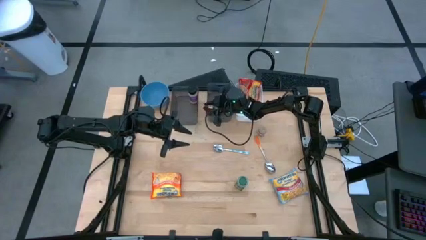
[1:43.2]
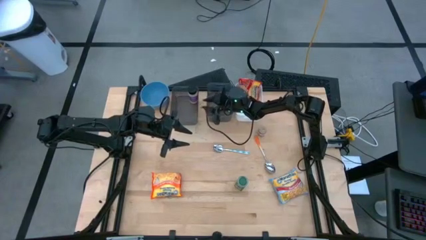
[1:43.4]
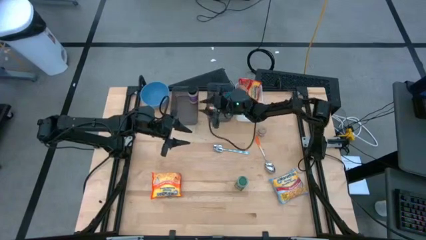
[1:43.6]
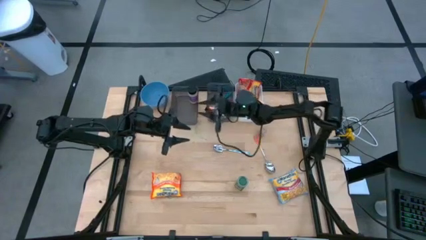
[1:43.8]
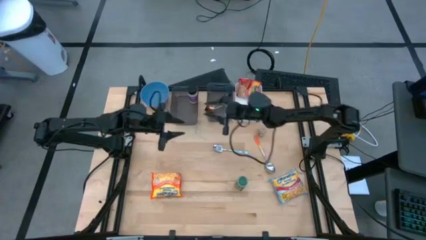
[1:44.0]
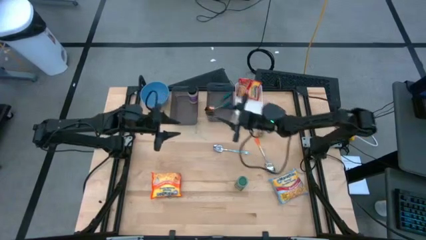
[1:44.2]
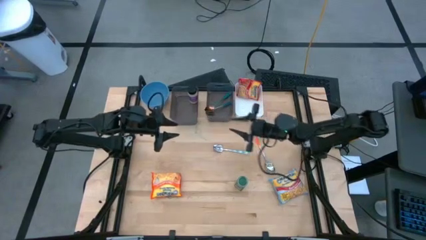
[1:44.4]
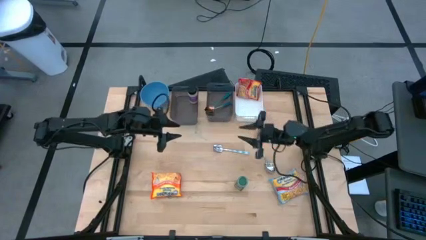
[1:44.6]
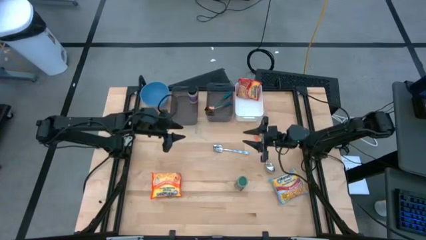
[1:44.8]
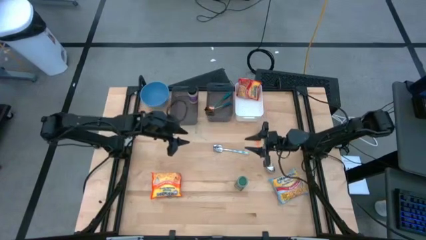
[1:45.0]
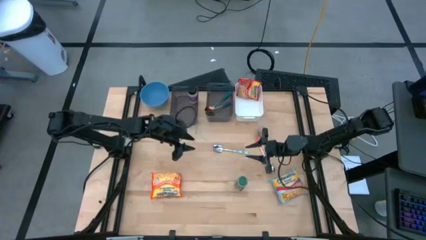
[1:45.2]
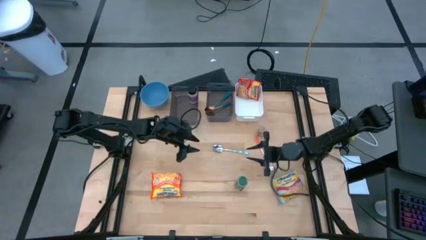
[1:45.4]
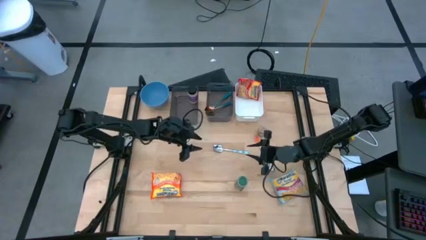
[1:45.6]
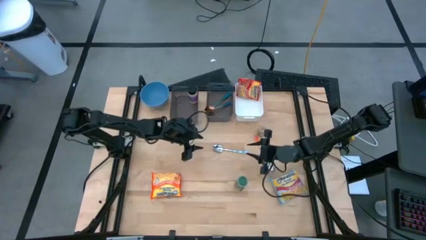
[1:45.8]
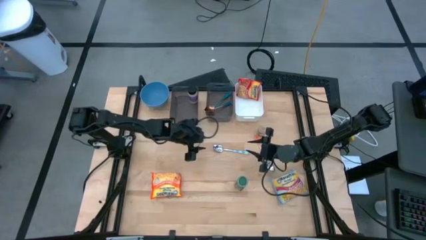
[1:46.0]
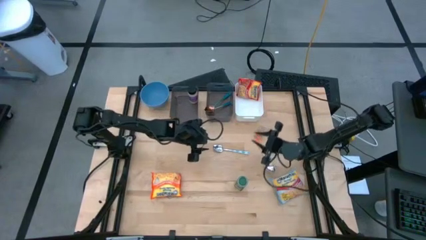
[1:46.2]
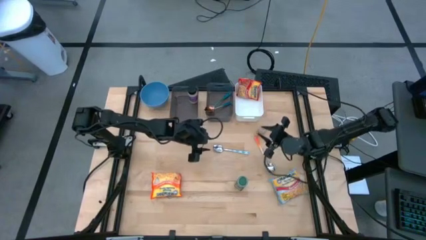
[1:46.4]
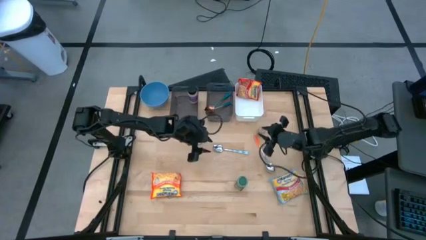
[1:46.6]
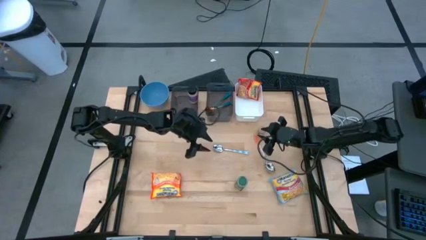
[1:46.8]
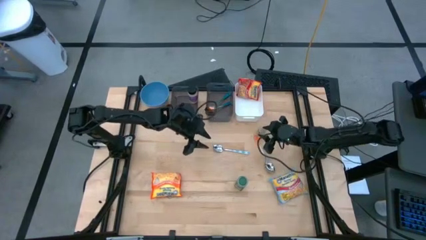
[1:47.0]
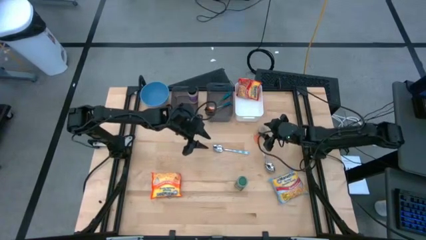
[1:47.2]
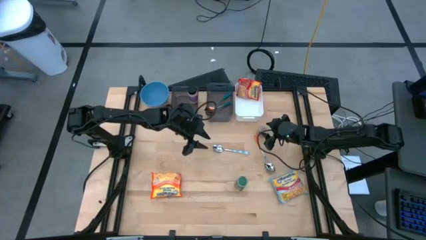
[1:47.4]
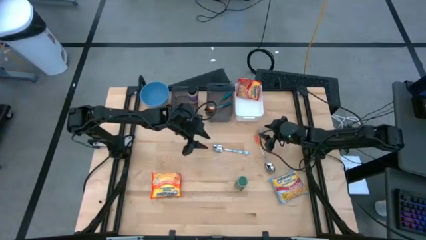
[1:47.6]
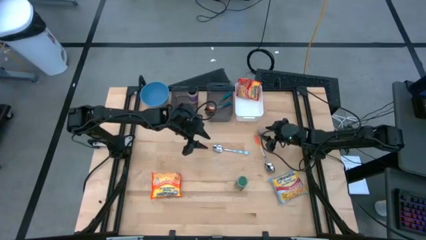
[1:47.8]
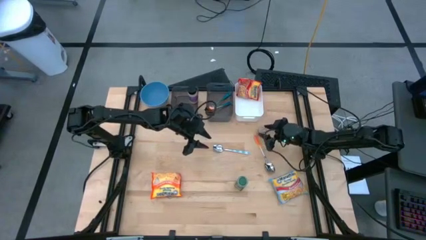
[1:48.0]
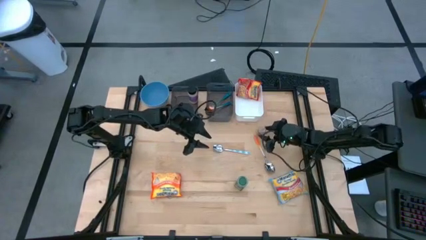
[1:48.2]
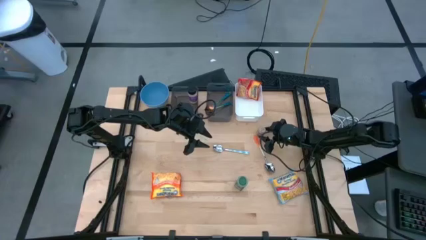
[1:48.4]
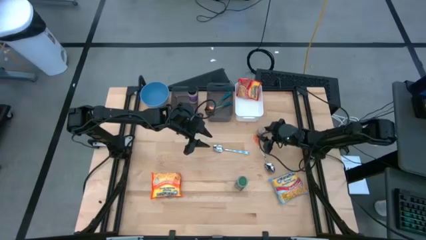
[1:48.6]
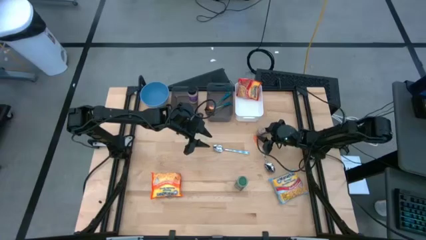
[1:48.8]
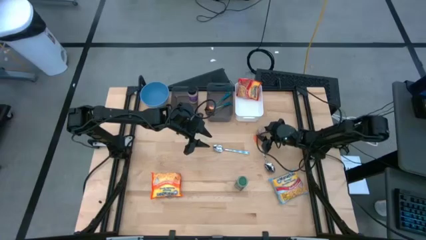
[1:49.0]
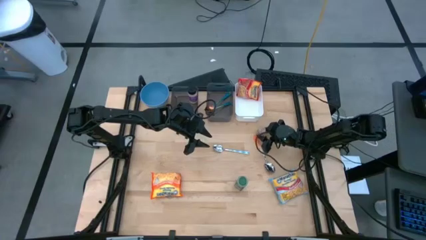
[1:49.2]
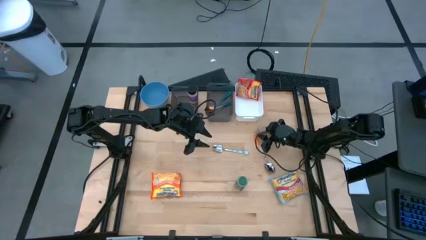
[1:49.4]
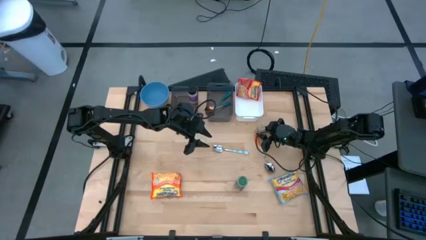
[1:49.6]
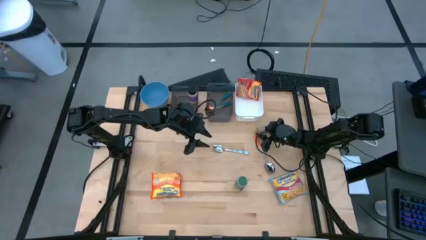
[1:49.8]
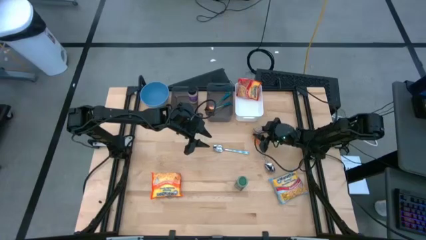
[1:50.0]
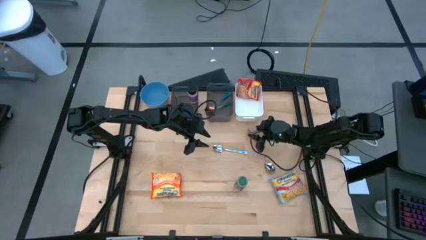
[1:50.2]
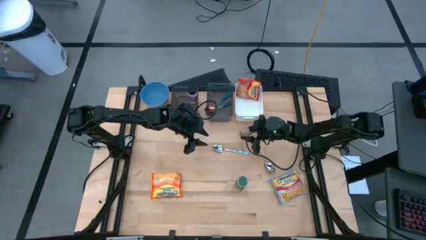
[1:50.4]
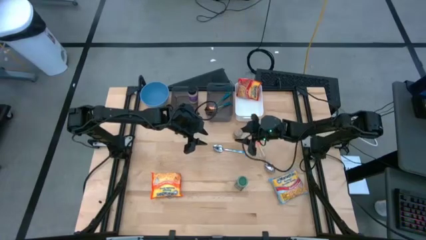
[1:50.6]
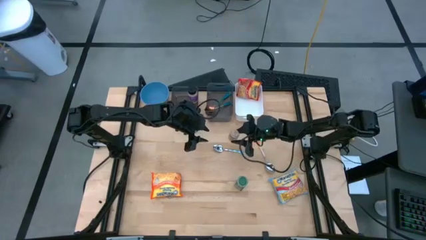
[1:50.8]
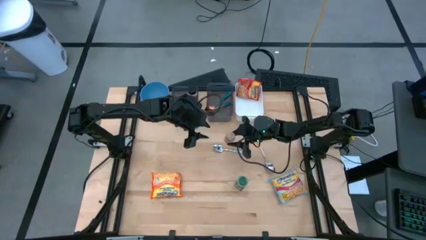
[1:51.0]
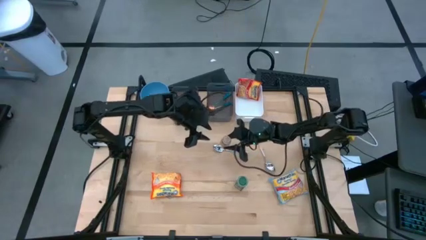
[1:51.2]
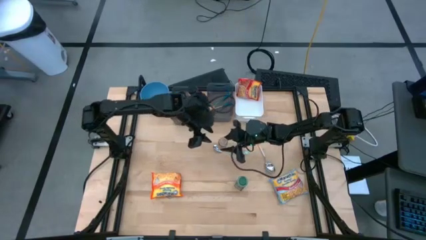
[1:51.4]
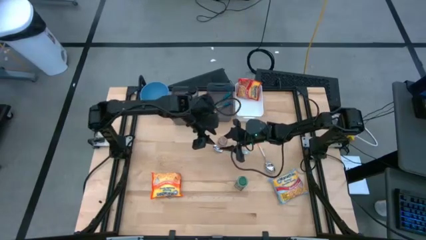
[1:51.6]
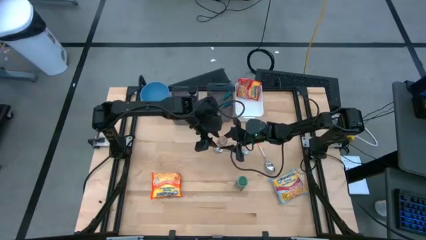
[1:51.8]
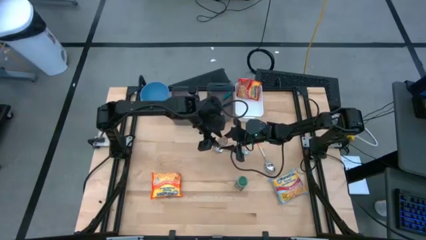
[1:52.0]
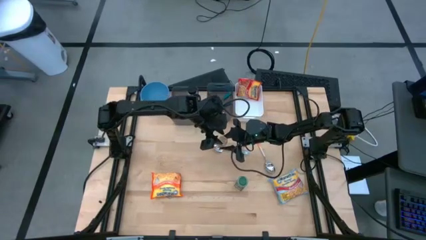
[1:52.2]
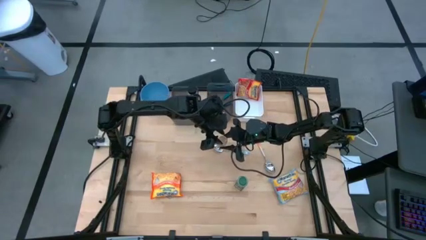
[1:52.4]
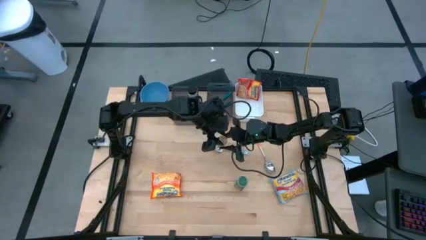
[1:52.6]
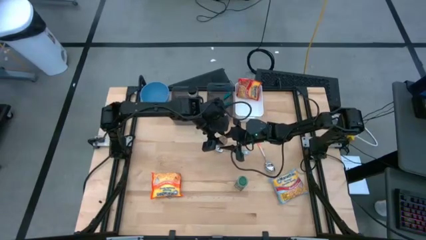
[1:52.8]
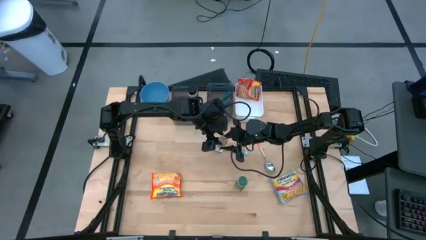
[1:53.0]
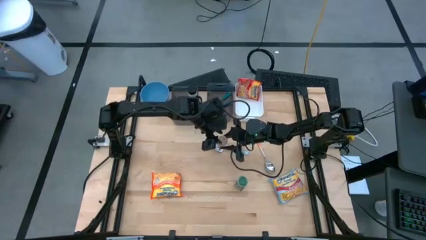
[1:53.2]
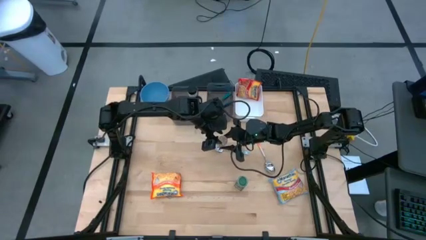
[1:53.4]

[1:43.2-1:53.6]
Task: Pick & Place Food Item
Put the brown spice bottle into the left black bin

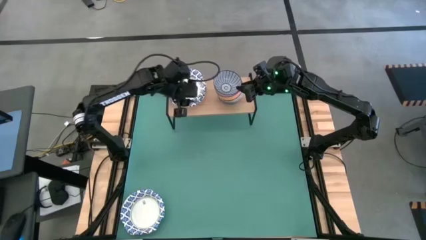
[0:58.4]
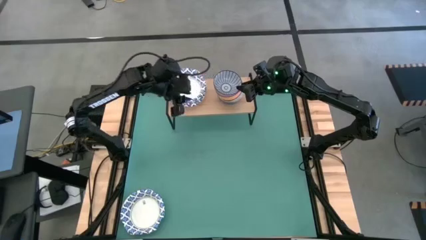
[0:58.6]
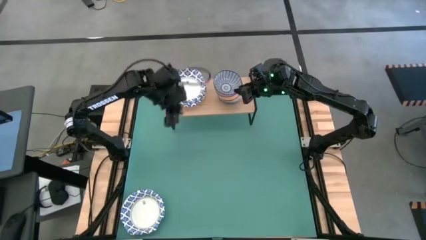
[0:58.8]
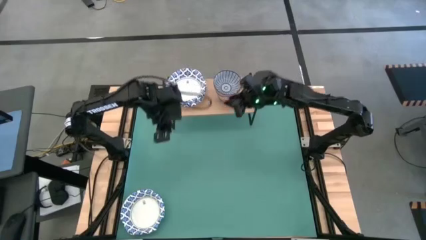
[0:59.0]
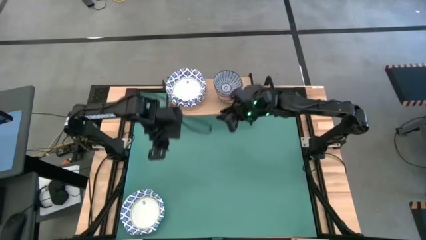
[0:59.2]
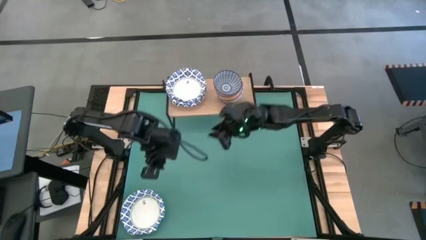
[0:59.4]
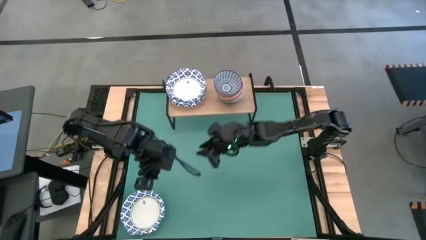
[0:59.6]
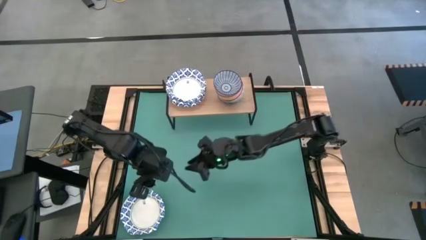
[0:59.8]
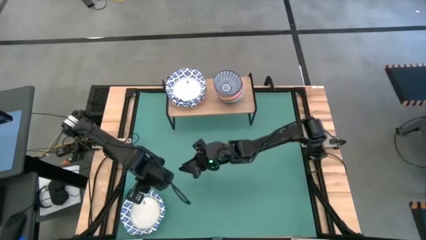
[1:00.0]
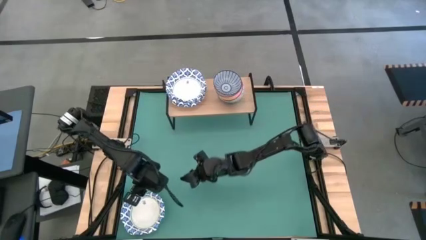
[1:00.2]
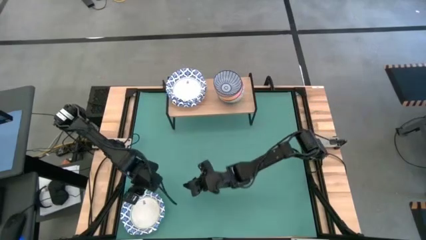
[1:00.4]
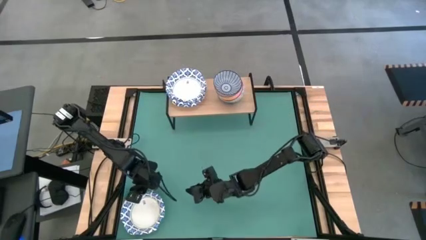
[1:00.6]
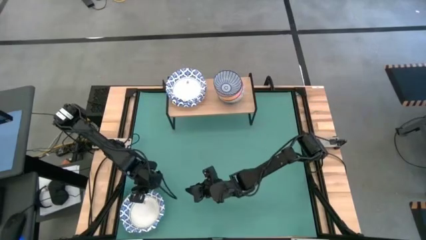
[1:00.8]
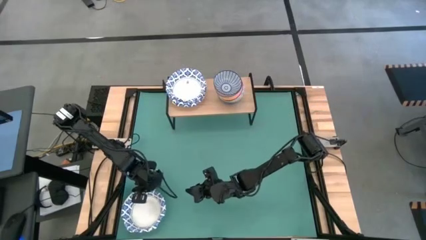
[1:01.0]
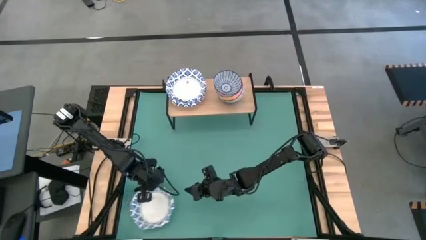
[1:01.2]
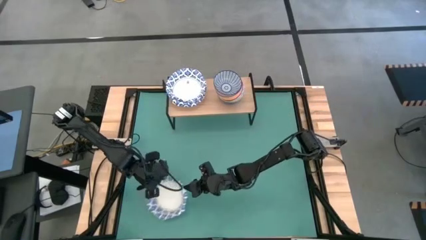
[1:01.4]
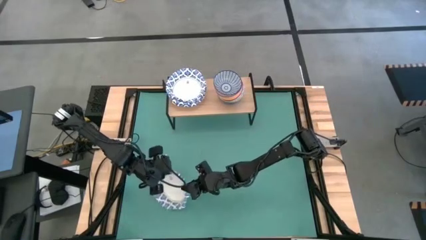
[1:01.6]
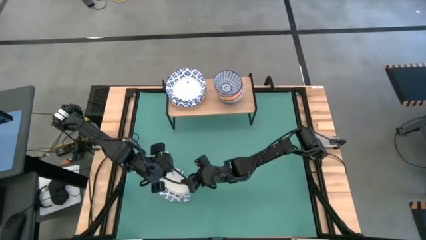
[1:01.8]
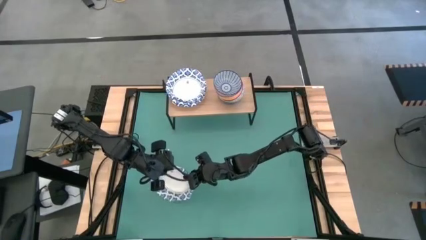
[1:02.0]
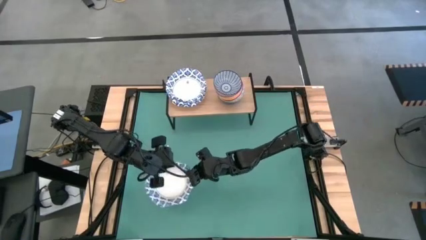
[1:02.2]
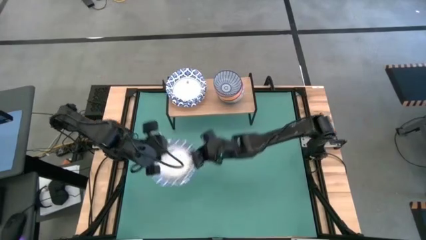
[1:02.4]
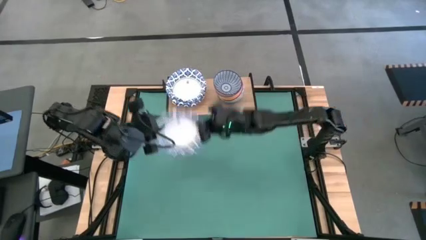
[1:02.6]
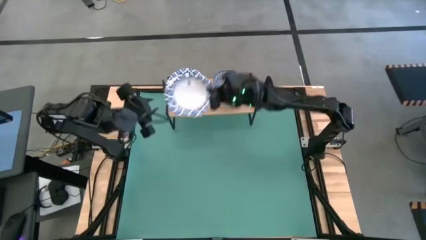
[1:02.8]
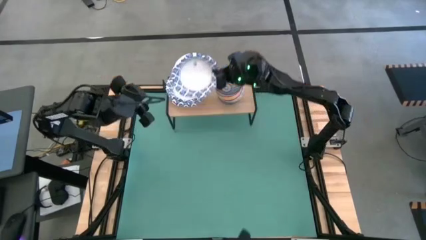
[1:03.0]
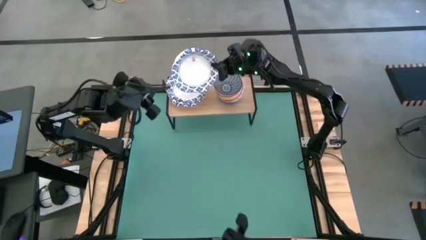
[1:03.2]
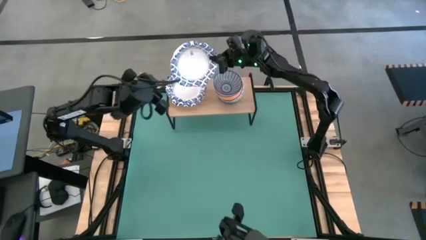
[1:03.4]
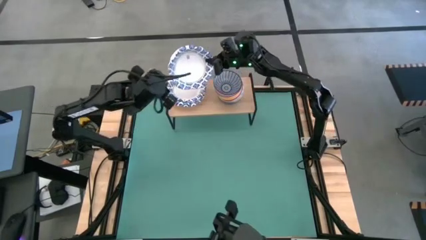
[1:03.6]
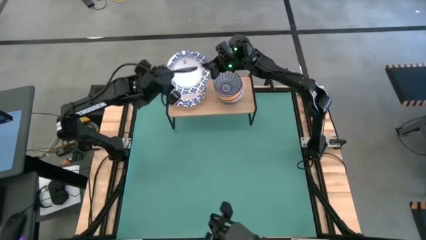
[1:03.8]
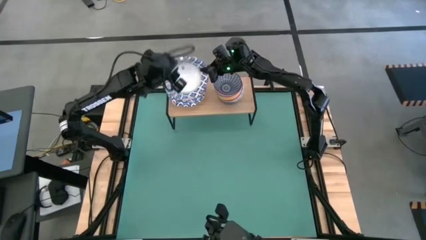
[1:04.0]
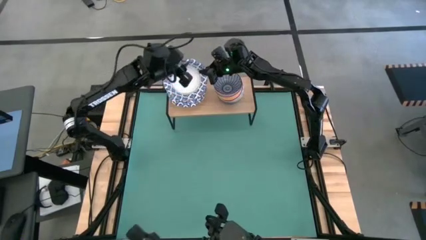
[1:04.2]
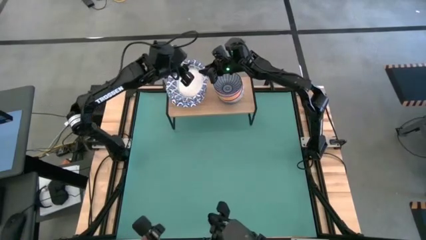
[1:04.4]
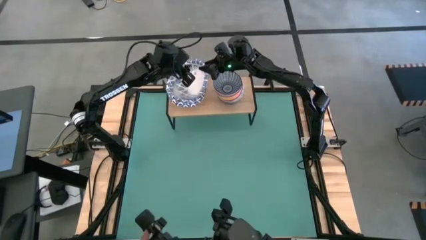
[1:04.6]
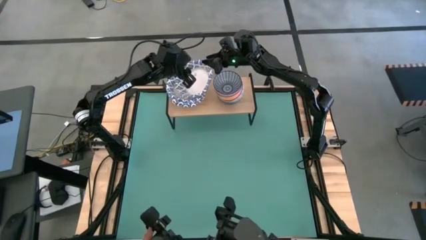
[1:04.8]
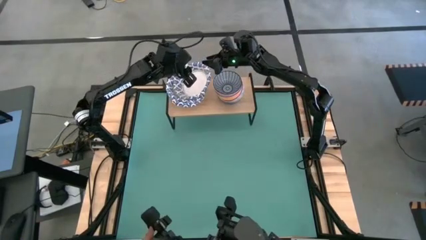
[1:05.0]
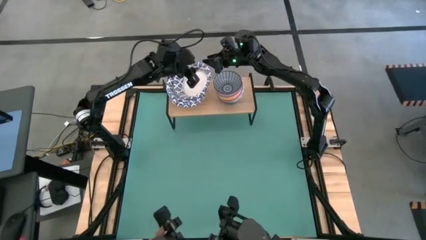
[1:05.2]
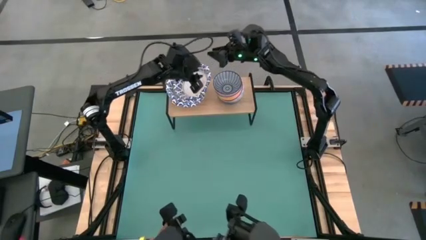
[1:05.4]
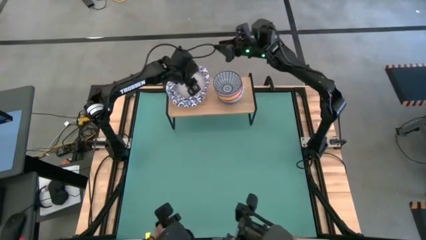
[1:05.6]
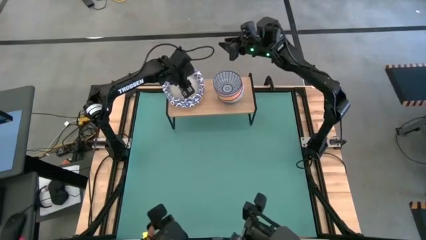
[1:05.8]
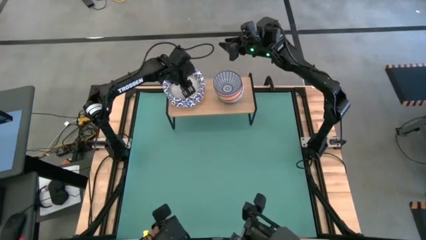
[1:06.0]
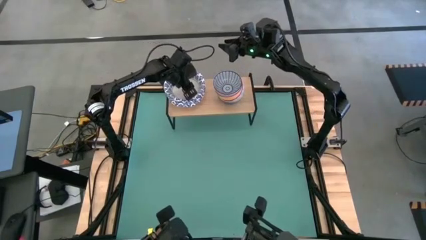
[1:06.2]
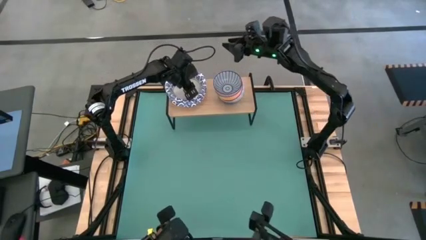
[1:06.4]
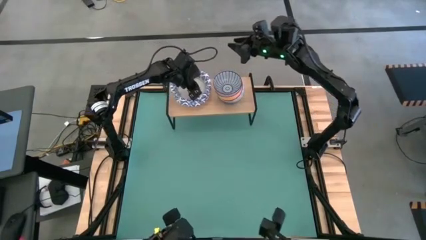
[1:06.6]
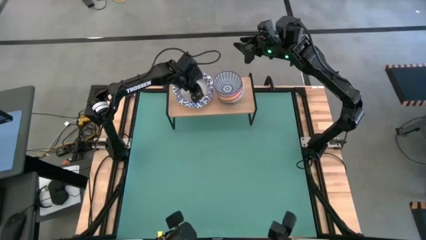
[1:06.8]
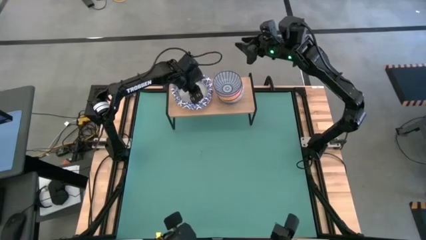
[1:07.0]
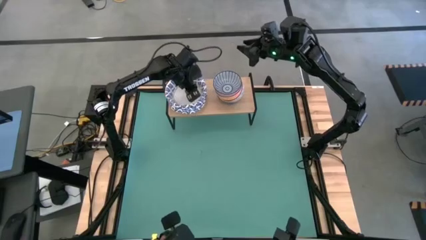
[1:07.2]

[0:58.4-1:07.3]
Task: Place and stack bowls onto a shelf
Stack the large white bowl on the stacked large white bowl on the shelf
